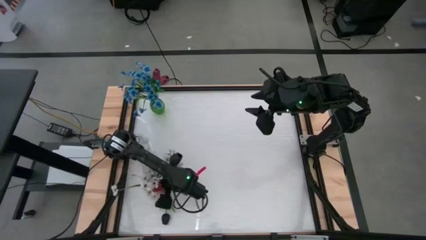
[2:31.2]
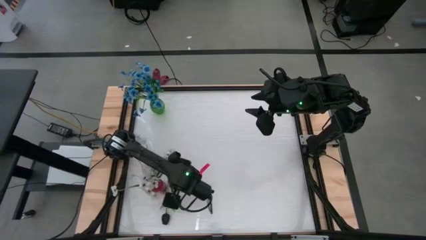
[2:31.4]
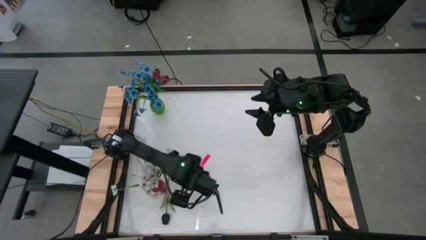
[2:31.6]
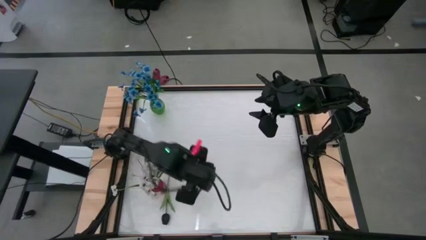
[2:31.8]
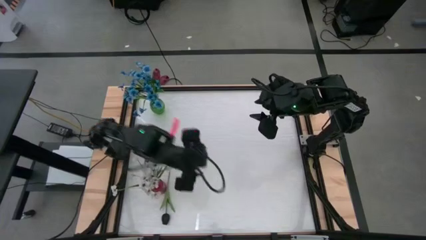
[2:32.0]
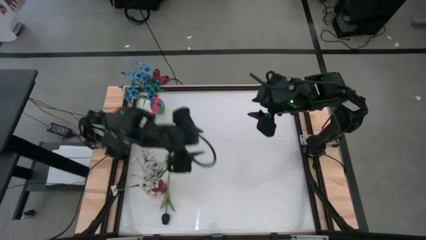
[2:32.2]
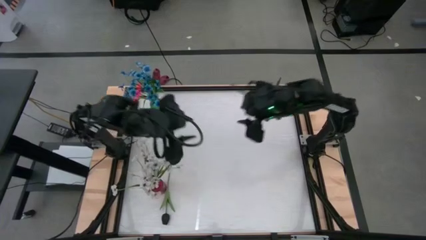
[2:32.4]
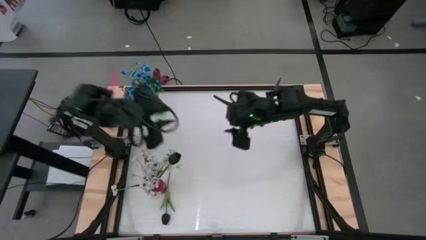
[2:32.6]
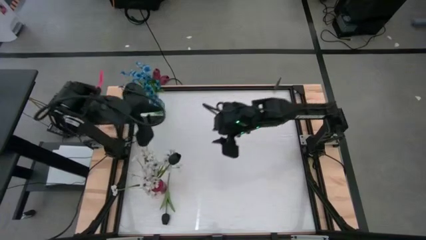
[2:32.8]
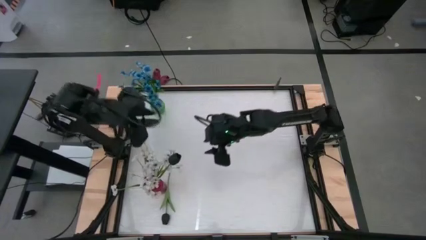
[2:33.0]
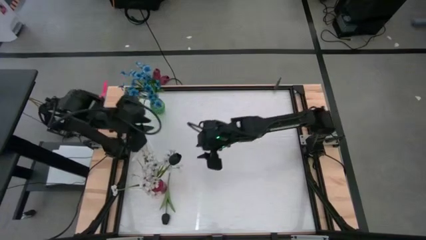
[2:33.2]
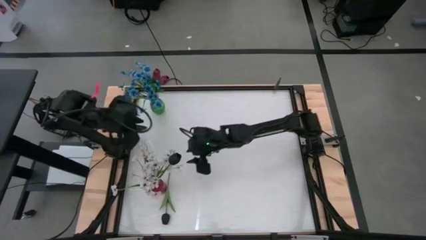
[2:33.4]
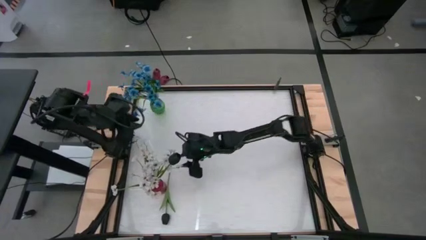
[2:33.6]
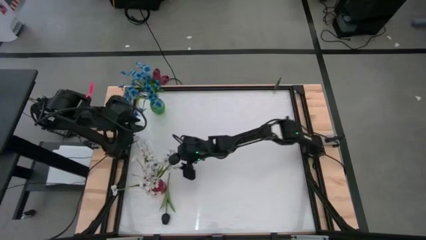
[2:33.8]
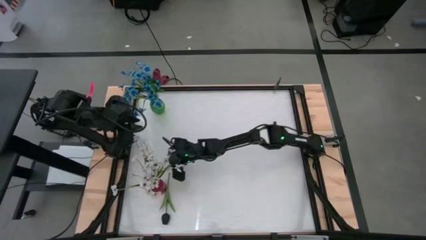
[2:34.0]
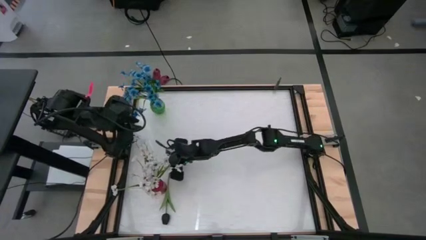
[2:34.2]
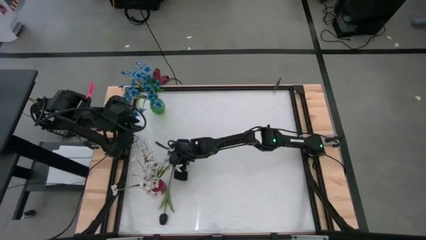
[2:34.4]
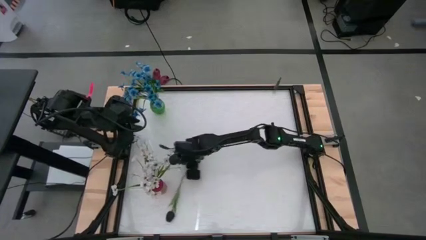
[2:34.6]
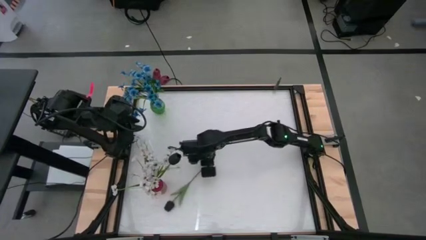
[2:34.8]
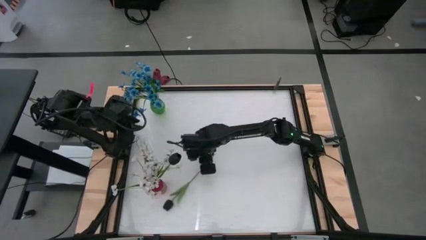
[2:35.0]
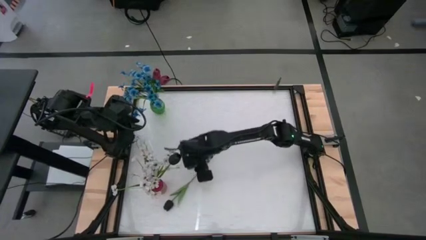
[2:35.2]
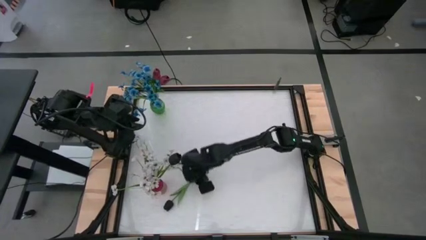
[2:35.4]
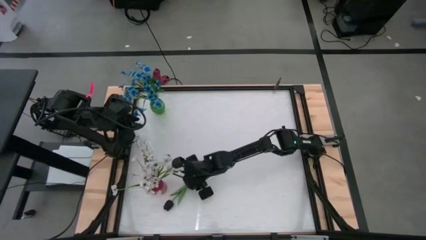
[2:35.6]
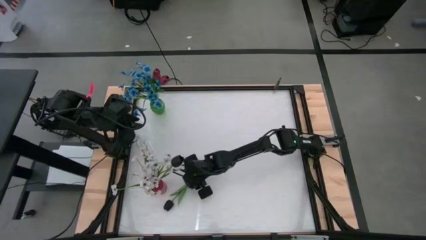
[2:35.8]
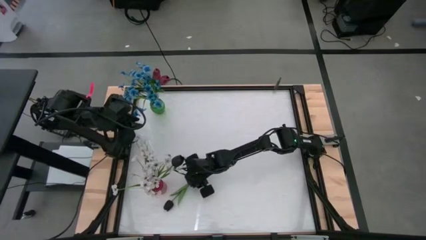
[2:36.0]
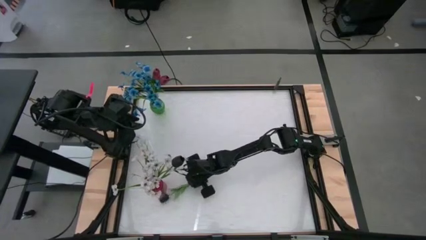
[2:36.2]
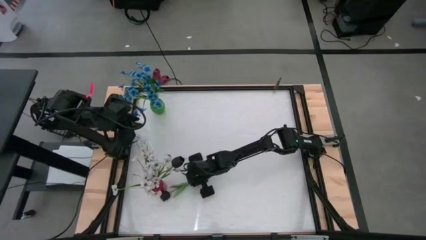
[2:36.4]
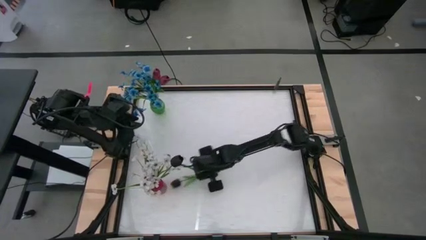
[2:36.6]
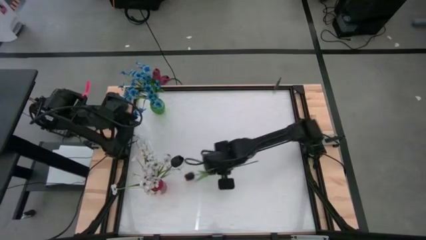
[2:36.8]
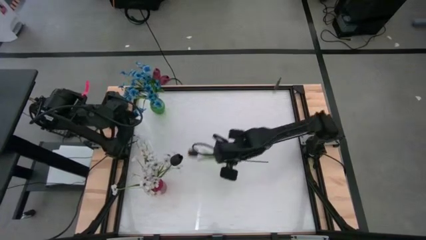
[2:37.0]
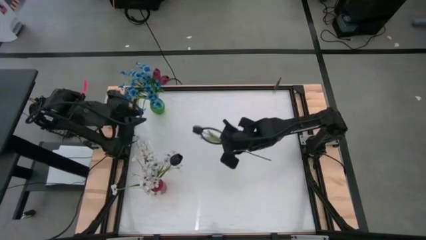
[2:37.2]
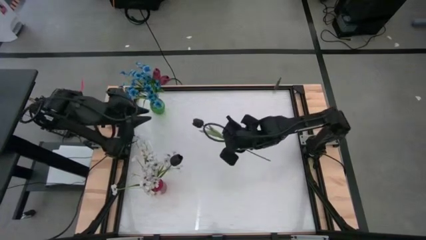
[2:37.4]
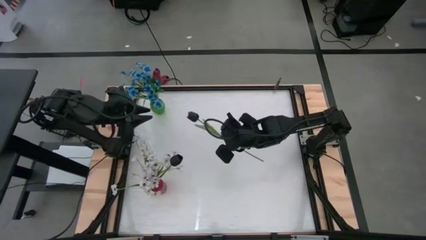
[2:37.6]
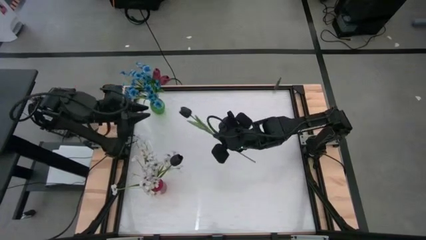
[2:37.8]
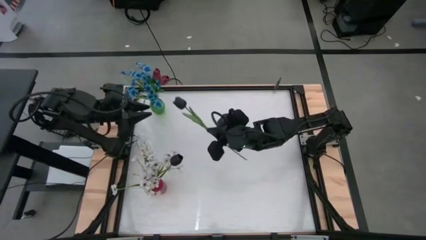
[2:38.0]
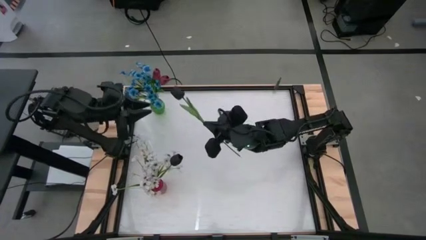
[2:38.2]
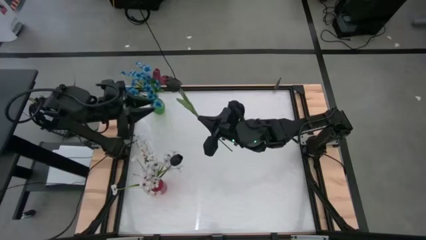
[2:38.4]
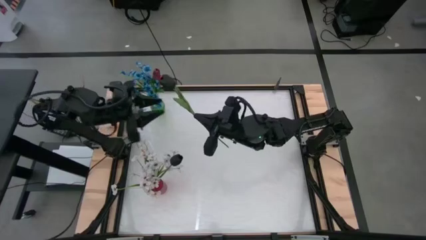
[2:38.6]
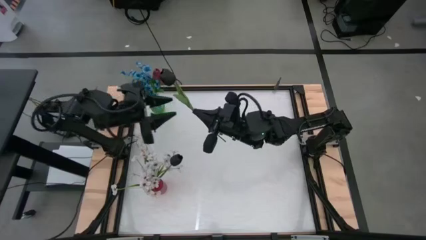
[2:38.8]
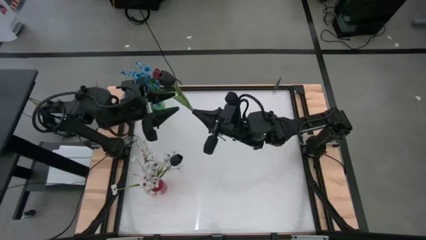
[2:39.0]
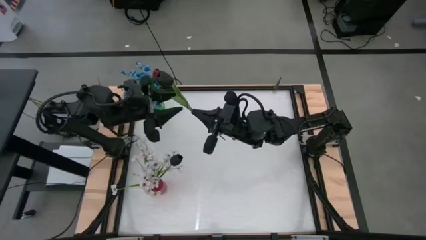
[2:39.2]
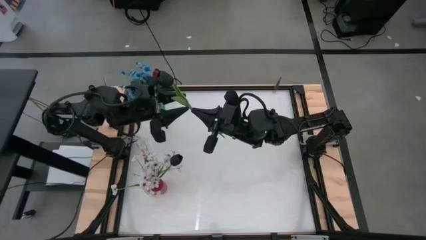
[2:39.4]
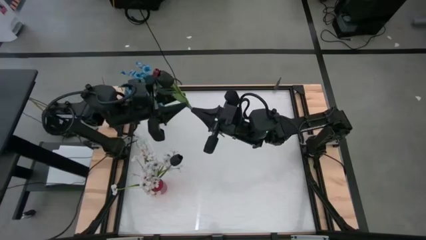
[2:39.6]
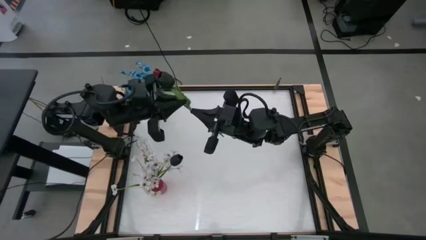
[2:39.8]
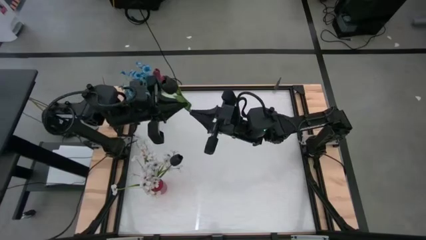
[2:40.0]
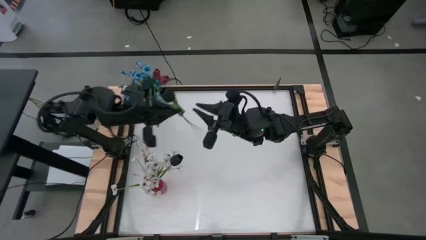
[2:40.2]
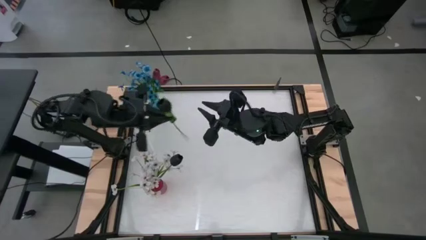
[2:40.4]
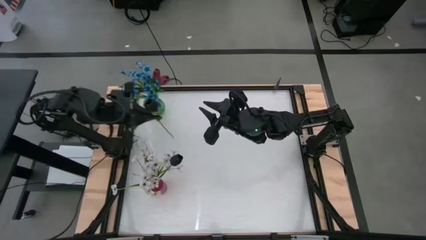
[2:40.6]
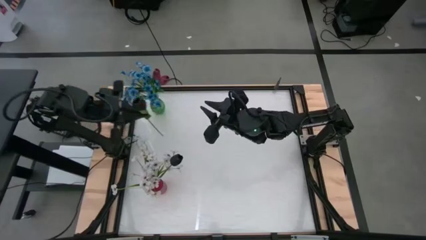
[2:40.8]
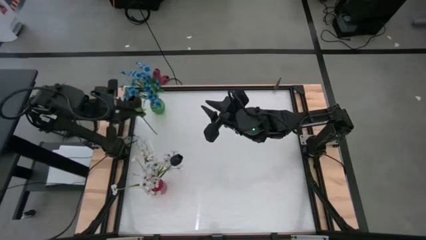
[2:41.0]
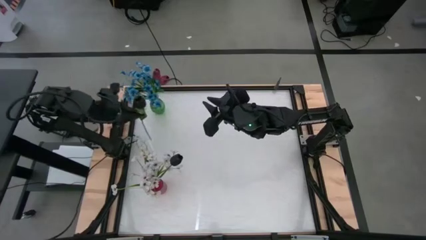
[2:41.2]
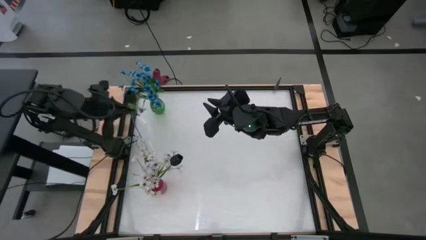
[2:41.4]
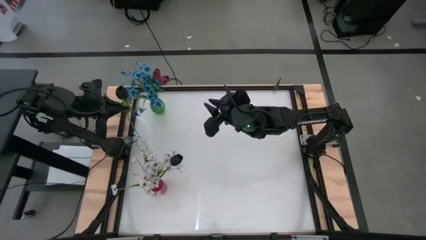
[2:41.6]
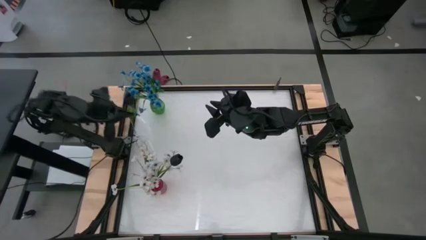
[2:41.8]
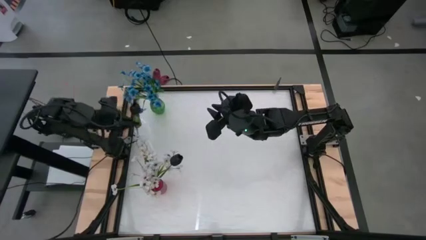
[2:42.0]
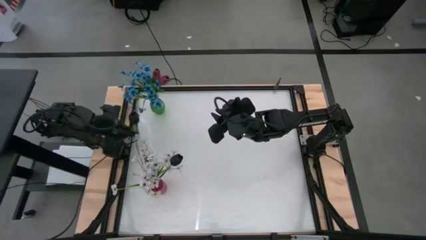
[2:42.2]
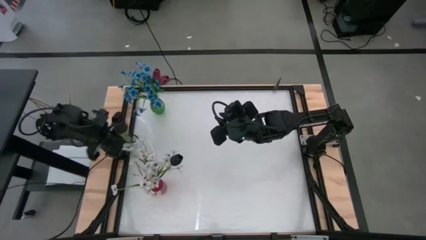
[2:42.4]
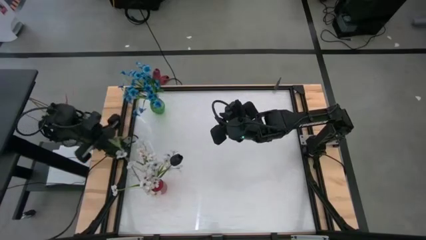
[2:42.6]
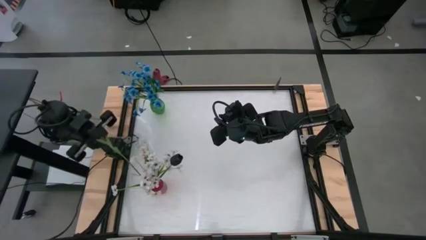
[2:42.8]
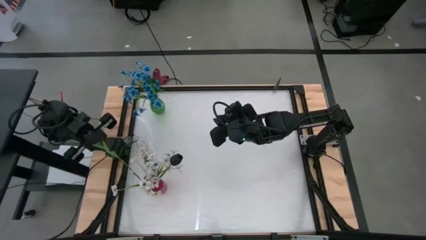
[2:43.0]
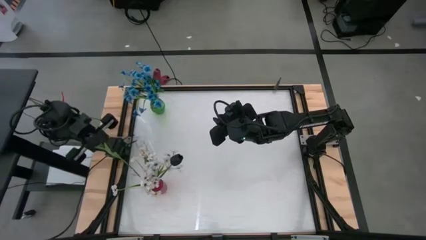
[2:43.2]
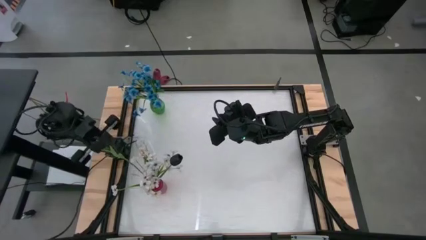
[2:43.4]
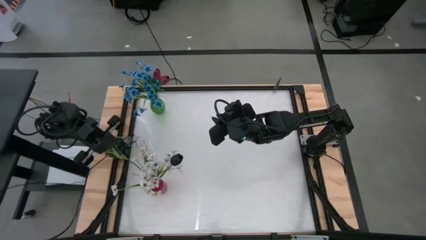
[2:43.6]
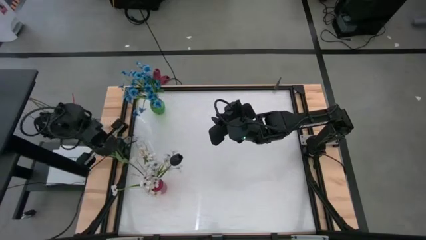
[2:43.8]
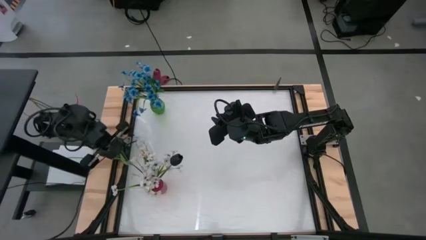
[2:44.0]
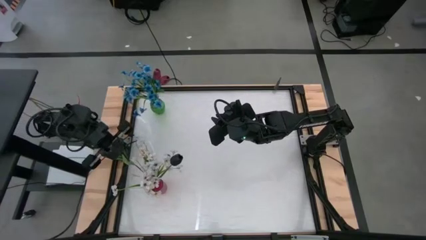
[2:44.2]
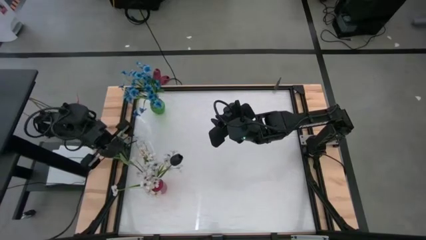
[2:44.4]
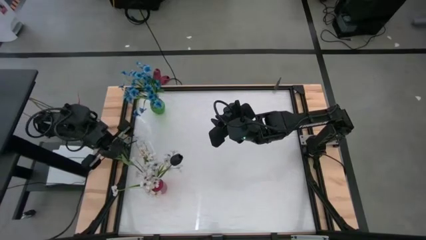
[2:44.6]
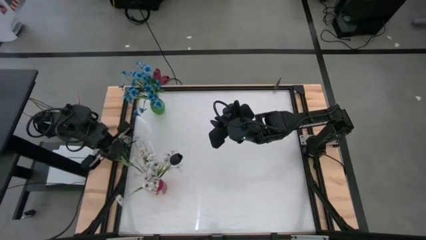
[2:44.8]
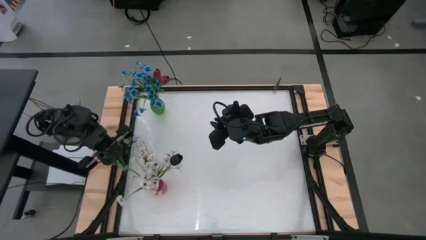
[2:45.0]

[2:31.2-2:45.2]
Task: Sort flowers into vase by color
Put the black tulip into the red vase

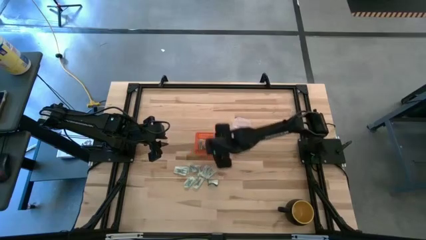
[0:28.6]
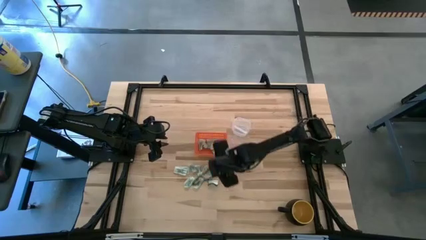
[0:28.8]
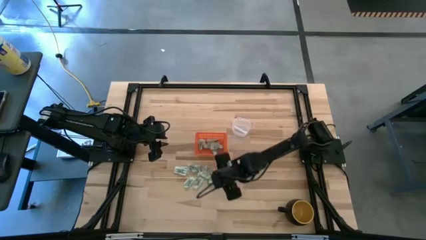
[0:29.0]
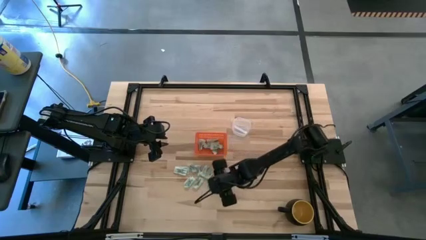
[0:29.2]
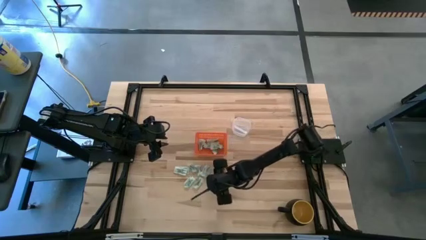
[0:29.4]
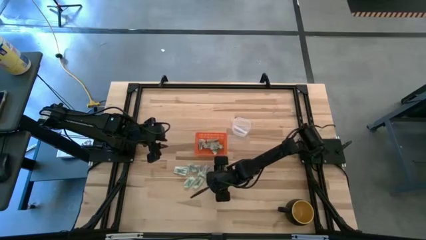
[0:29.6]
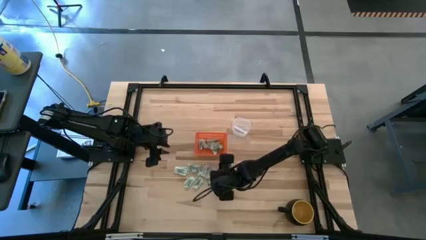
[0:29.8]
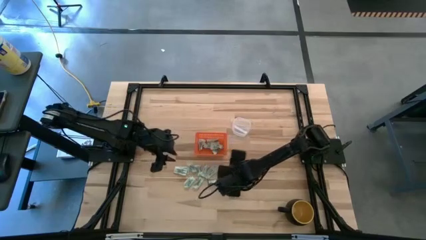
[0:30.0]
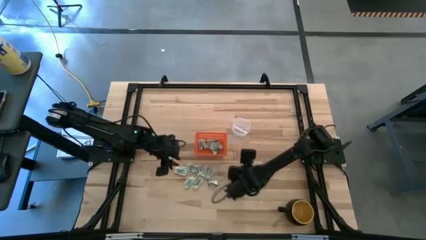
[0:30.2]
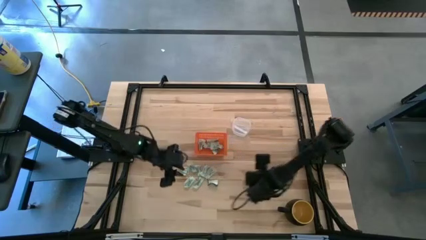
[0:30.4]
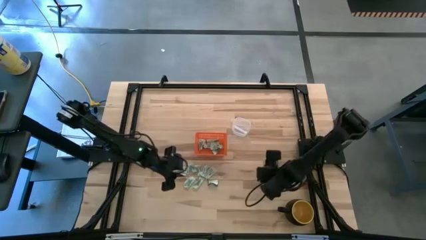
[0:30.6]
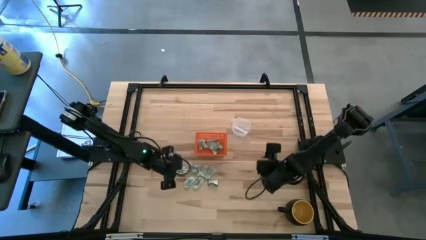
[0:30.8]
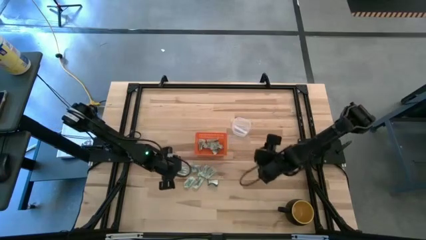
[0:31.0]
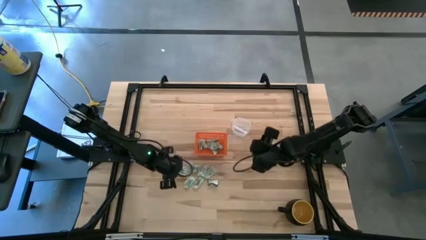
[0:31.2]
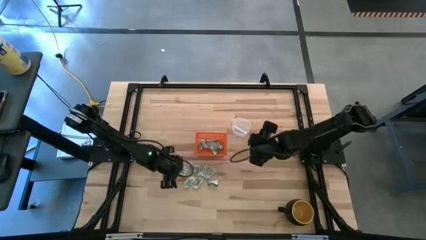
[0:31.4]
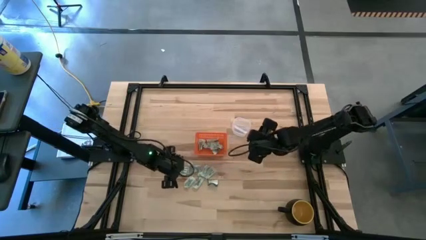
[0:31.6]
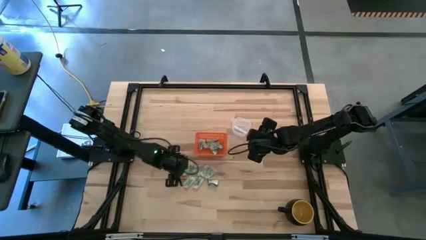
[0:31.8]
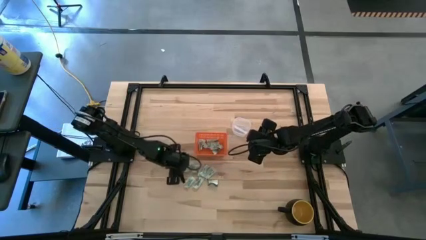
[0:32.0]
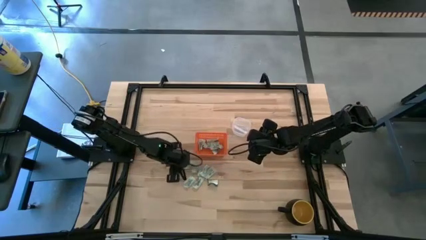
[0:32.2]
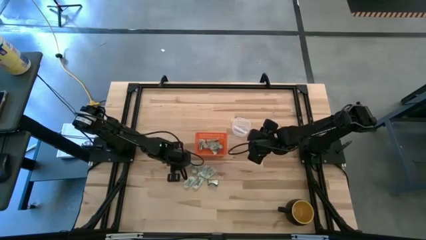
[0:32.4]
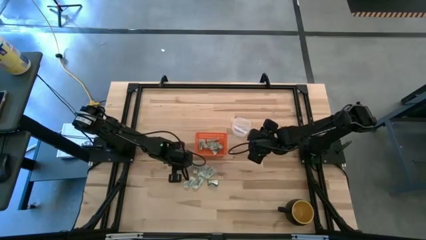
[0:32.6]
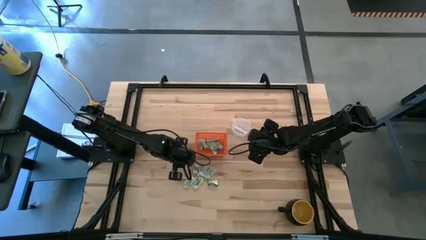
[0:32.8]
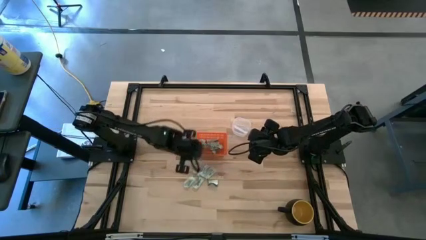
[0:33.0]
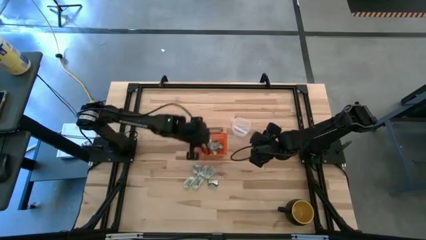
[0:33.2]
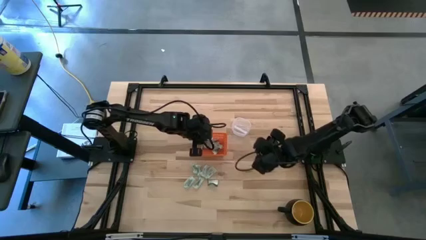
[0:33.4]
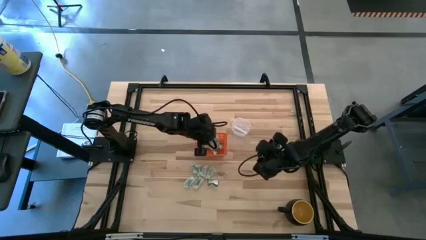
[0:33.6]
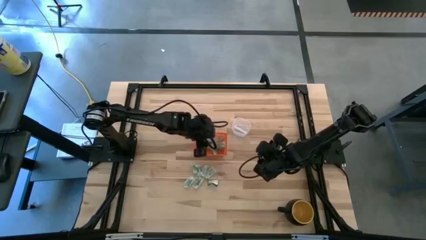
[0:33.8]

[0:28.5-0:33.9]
Task: Pick and place Stevia / Truvia into bins
Put the stevia packet into the basket
